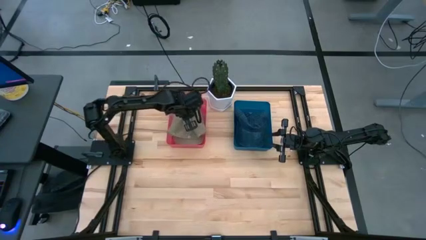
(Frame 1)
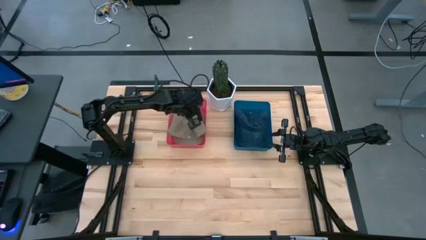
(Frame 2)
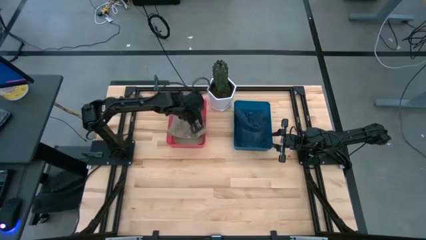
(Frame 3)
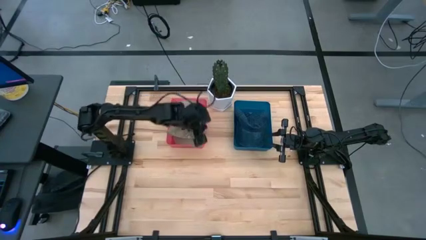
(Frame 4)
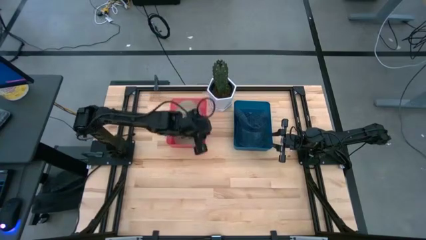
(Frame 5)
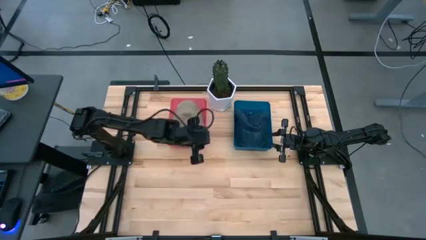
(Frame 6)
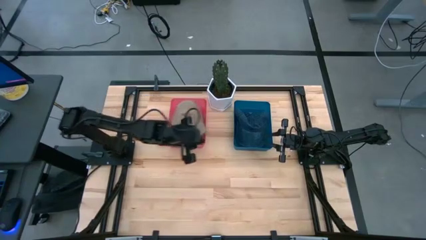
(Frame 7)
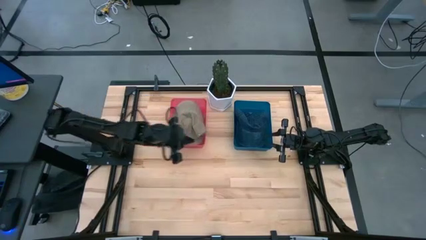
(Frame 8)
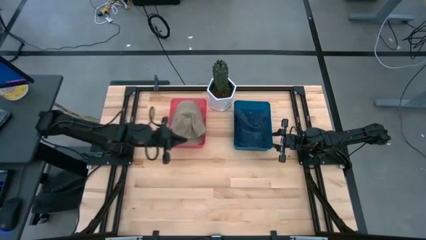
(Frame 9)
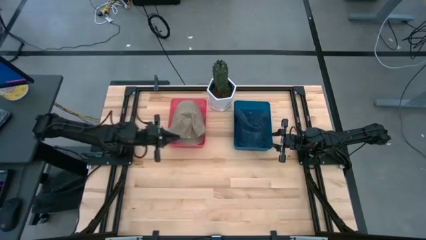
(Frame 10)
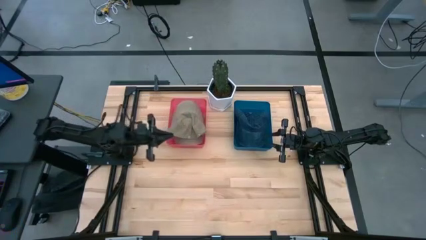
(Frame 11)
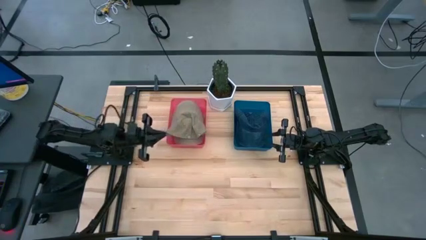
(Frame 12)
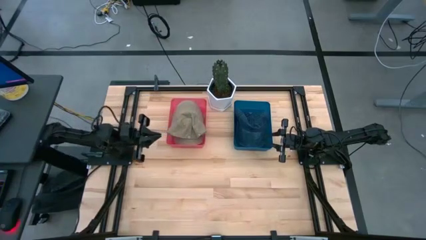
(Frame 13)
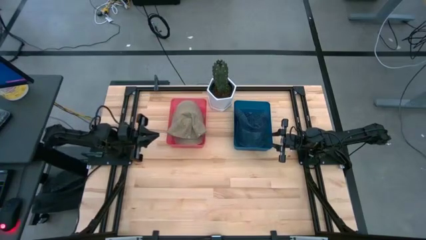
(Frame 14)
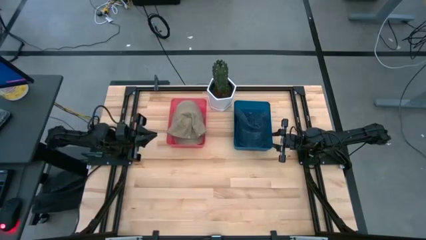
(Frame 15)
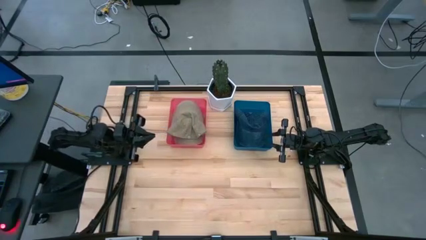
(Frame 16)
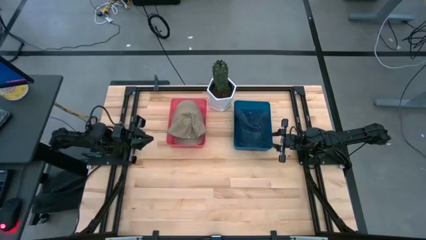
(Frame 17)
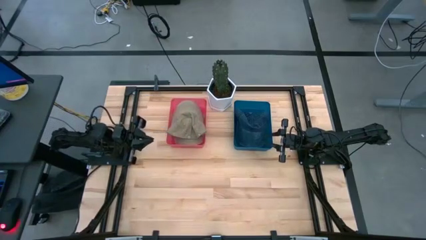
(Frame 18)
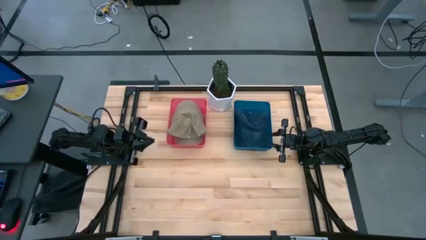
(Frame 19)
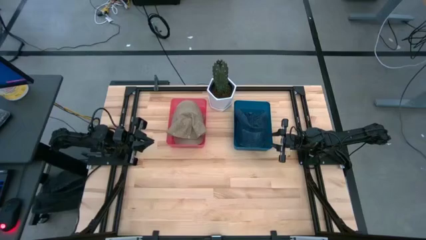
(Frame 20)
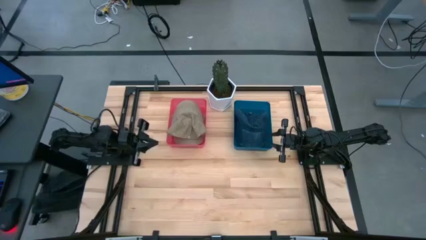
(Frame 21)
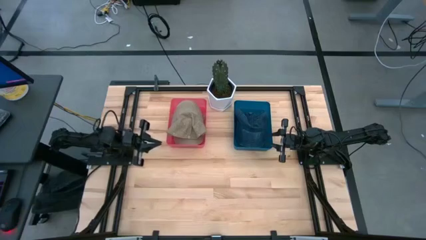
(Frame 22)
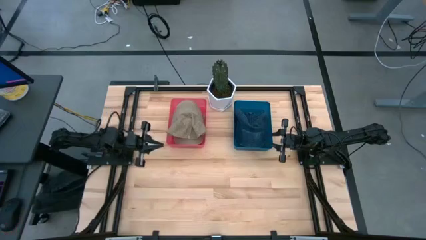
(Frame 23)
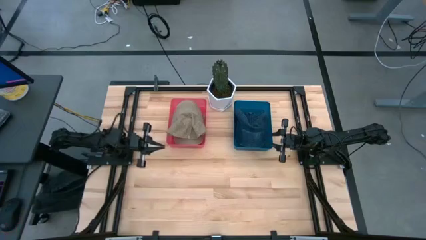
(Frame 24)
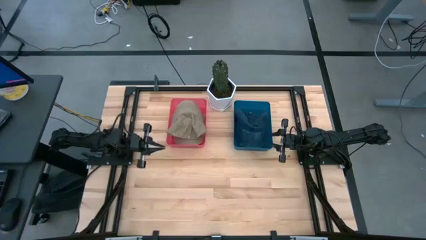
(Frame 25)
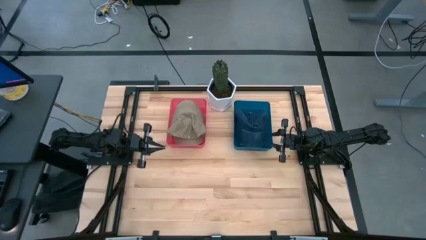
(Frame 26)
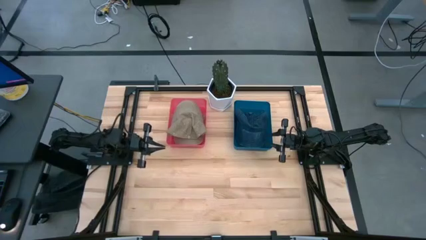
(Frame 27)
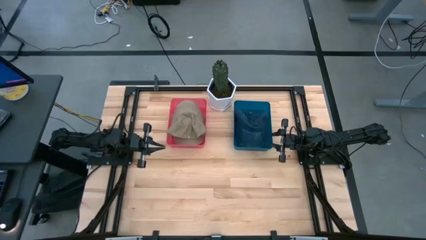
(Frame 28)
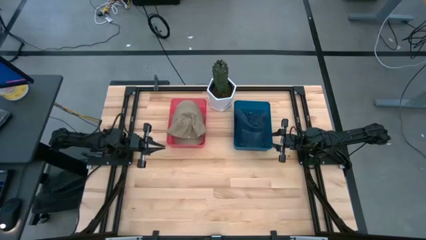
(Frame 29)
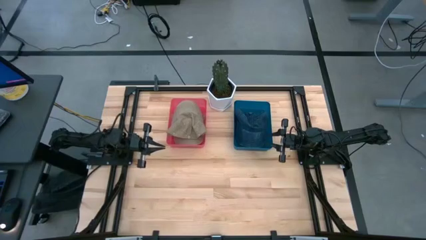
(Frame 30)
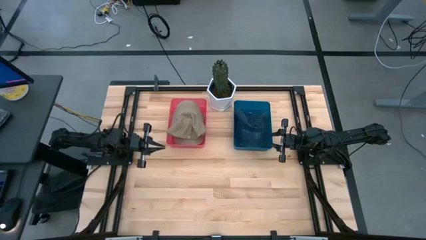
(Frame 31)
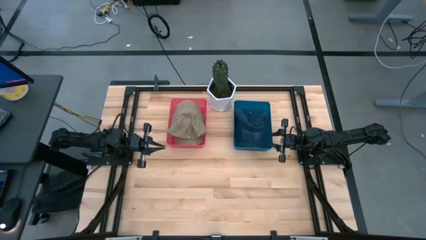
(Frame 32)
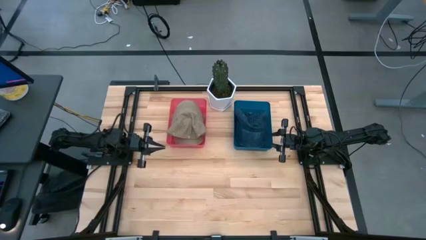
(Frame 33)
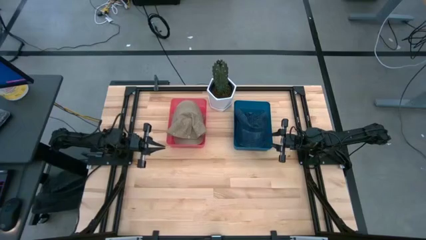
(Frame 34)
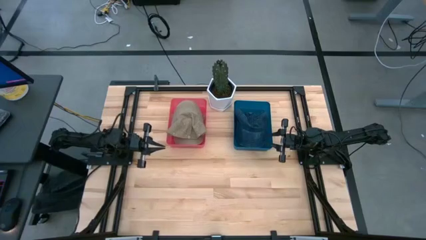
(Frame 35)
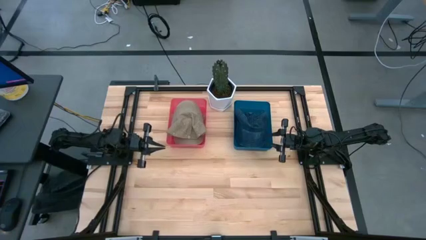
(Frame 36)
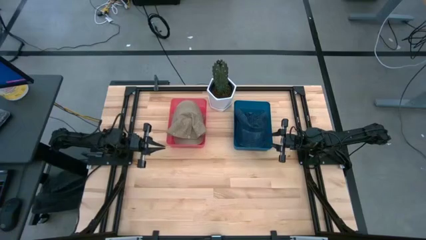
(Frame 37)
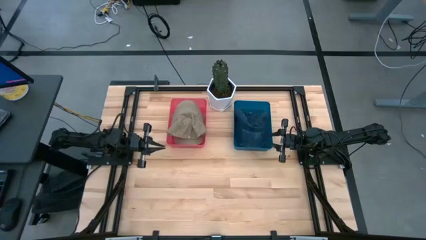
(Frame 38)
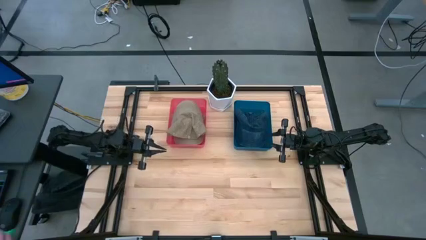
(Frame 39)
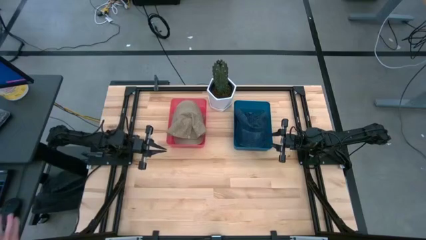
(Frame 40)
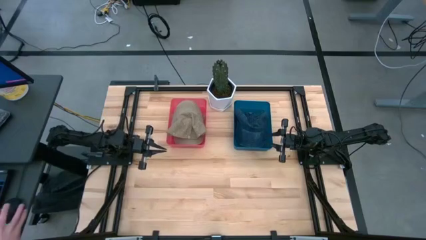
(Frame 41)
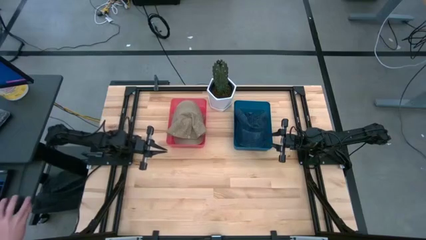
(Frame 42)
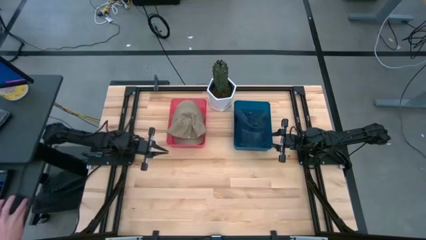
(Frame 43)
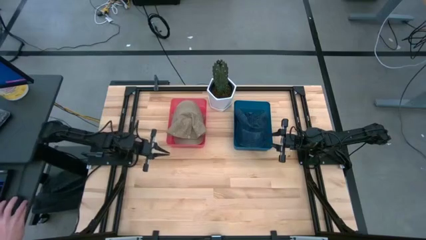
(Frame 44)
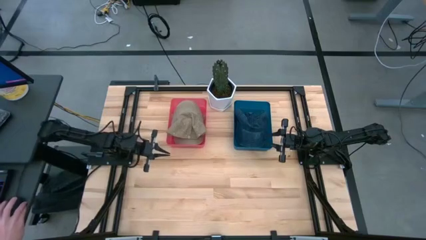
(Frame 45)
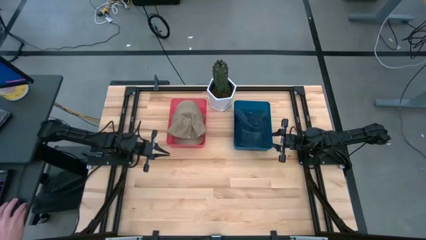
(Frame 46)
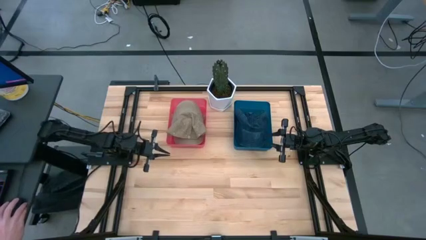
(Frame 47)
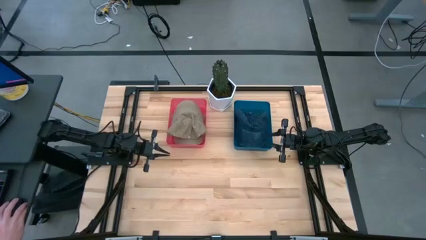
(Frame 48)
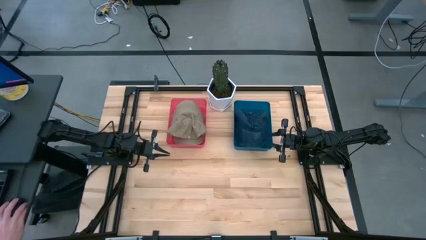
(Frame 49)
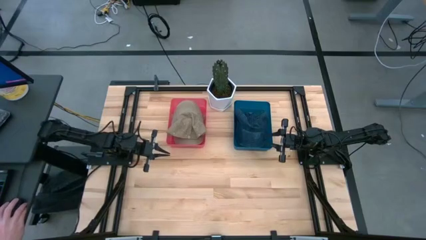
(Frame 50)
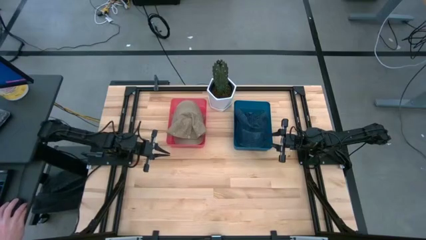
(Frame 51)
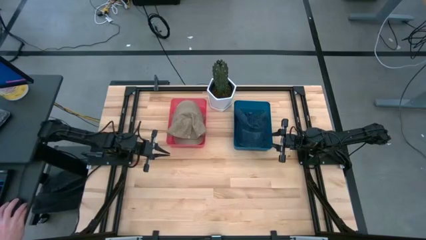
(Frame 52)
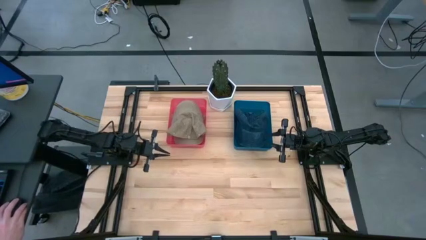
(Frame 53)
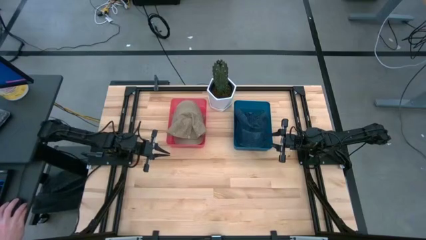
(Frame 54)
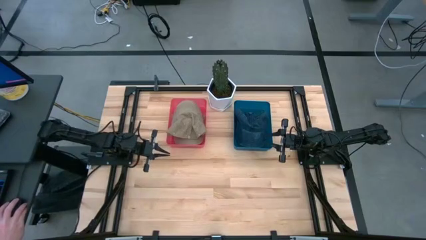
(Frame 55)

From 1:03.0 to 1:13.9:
Task: Pick & Place hat
Return to Home Position
